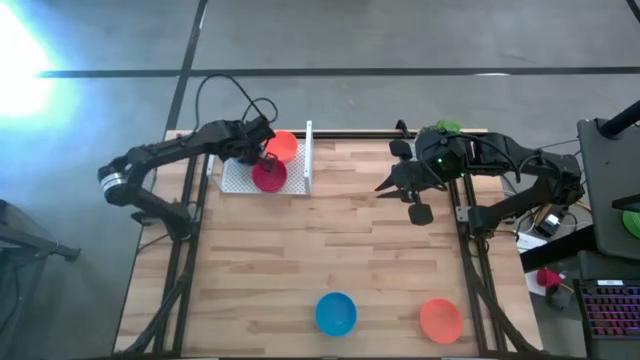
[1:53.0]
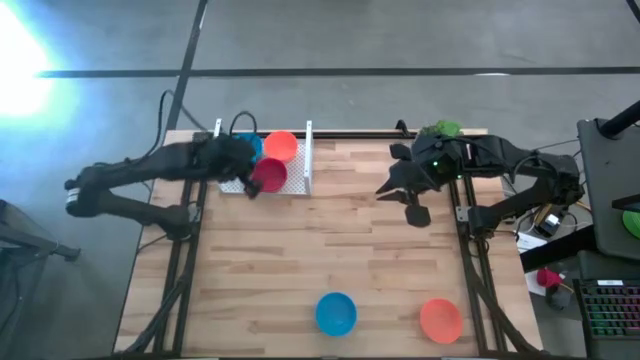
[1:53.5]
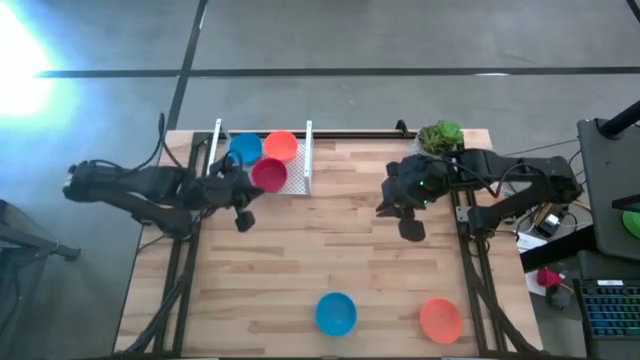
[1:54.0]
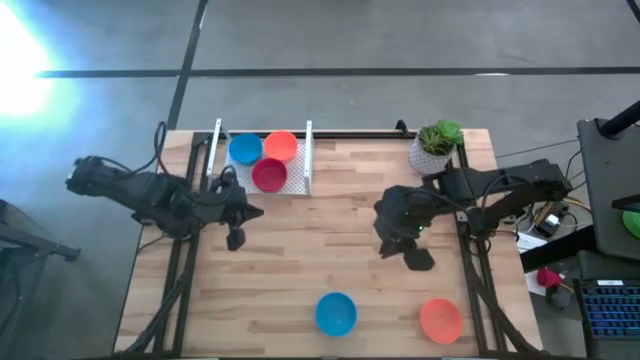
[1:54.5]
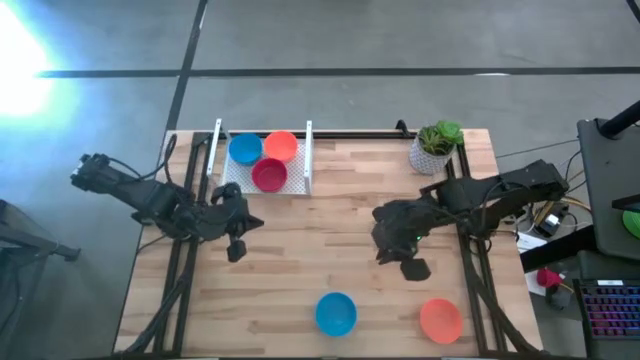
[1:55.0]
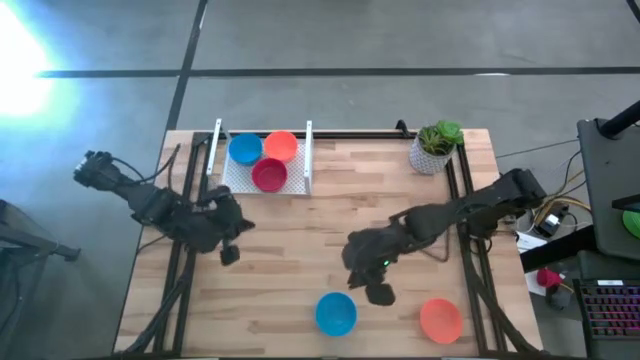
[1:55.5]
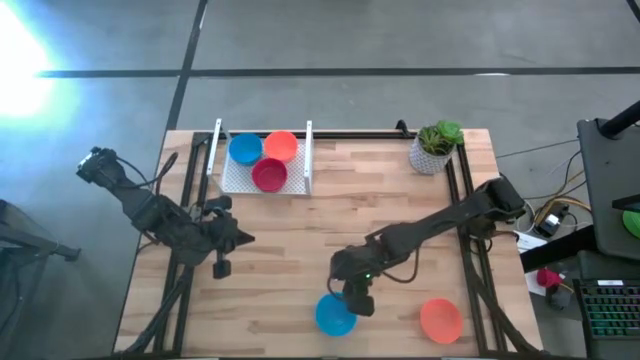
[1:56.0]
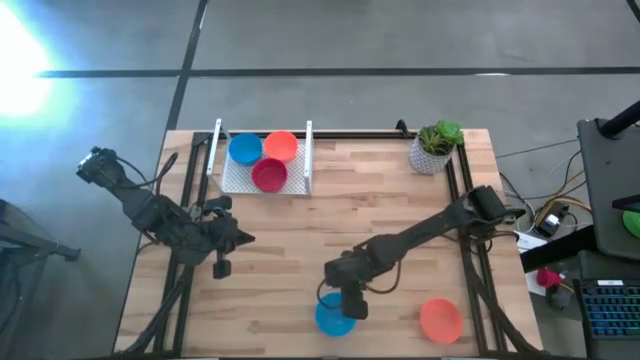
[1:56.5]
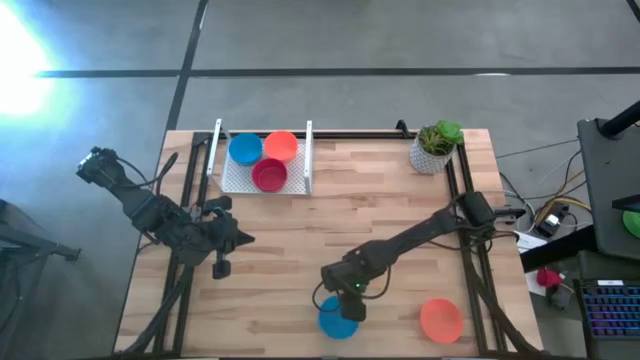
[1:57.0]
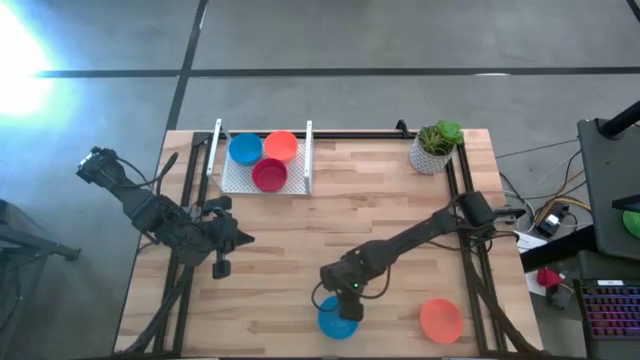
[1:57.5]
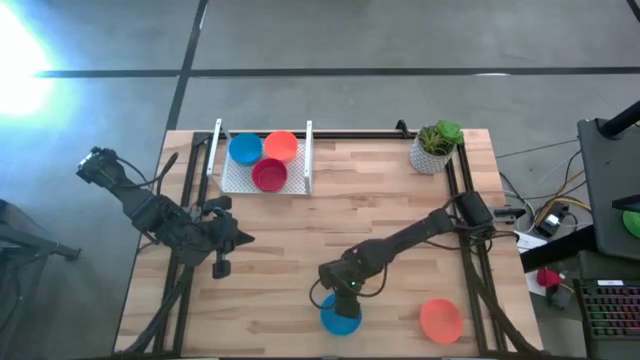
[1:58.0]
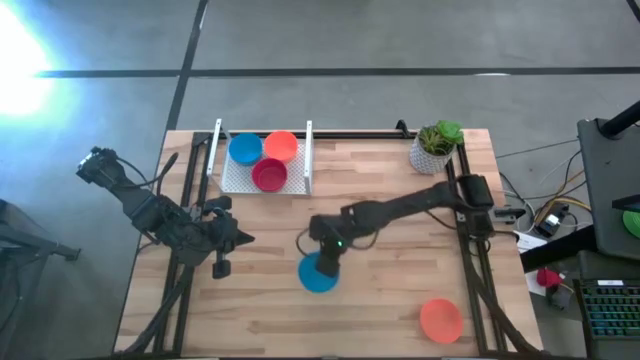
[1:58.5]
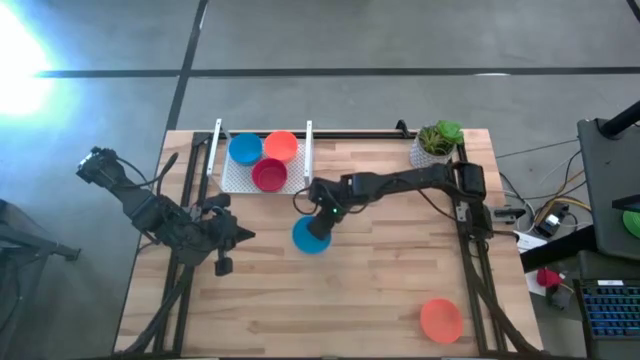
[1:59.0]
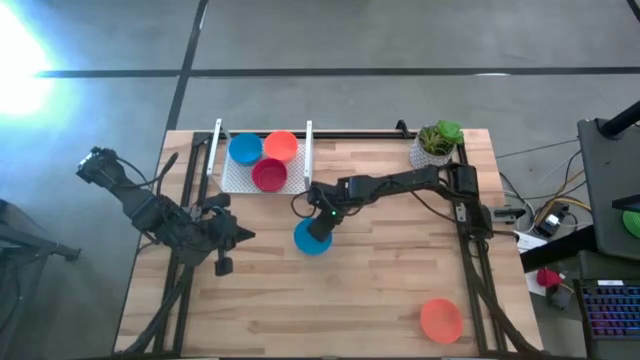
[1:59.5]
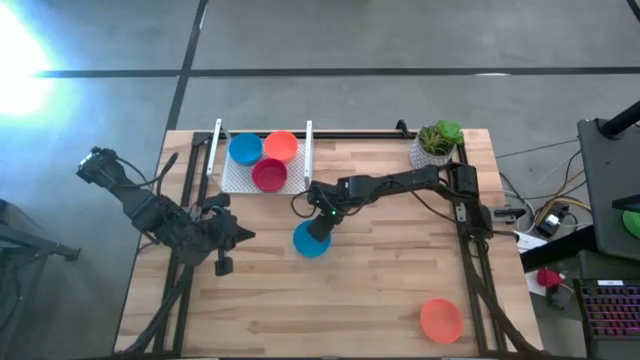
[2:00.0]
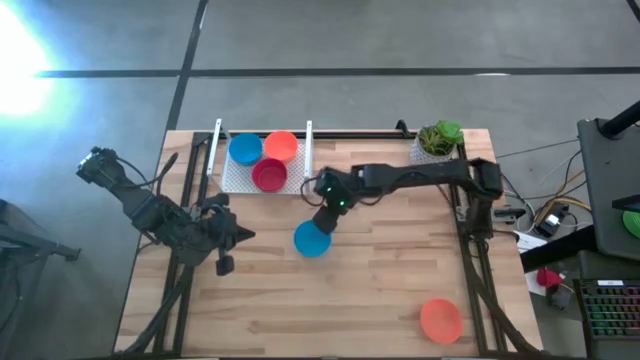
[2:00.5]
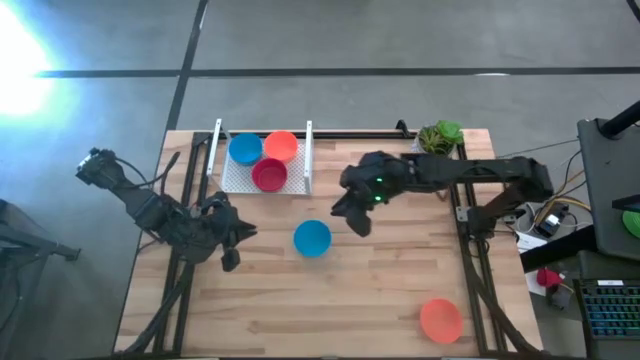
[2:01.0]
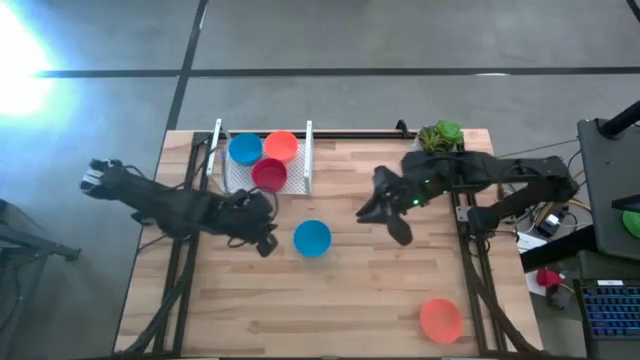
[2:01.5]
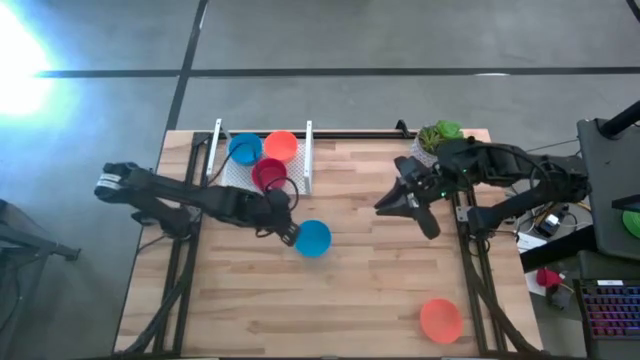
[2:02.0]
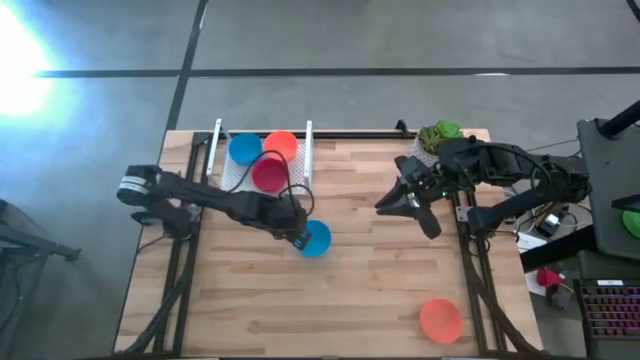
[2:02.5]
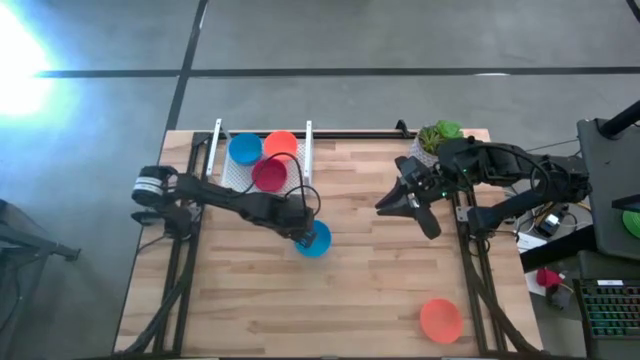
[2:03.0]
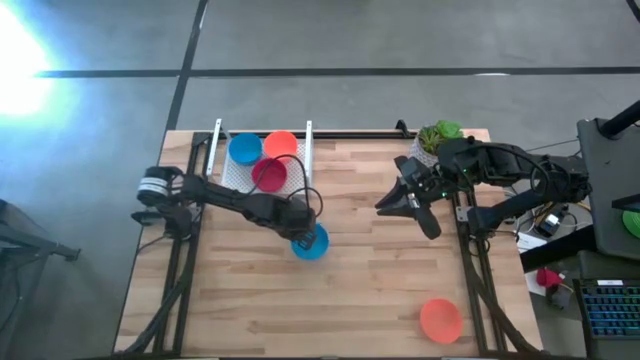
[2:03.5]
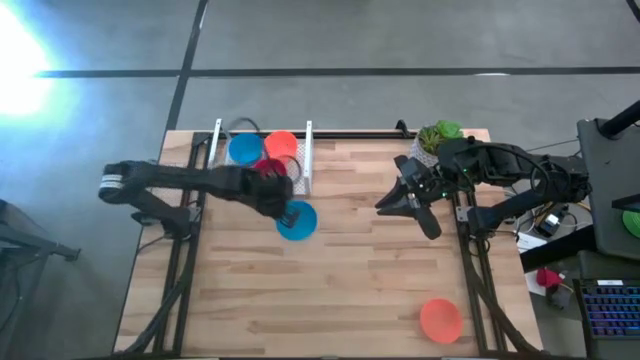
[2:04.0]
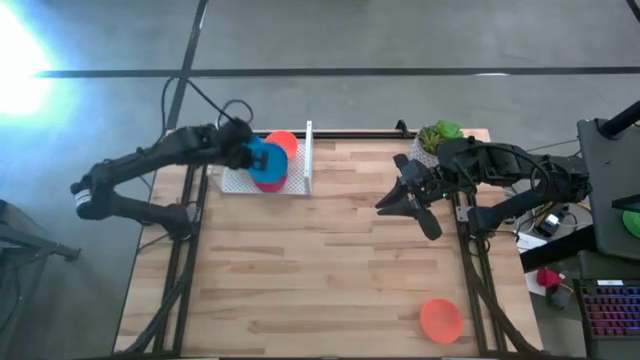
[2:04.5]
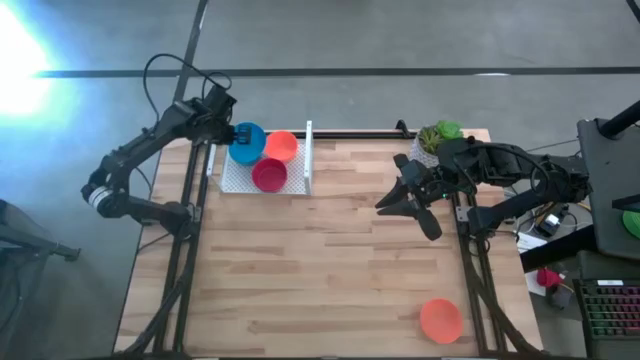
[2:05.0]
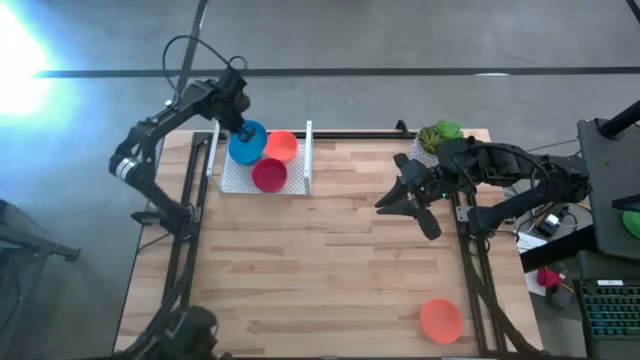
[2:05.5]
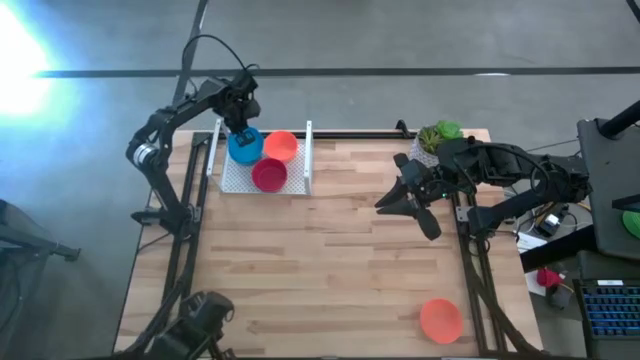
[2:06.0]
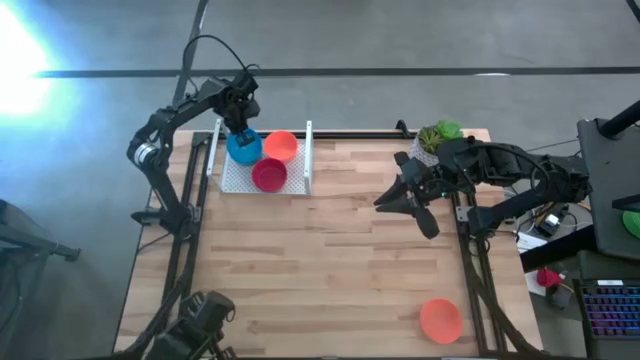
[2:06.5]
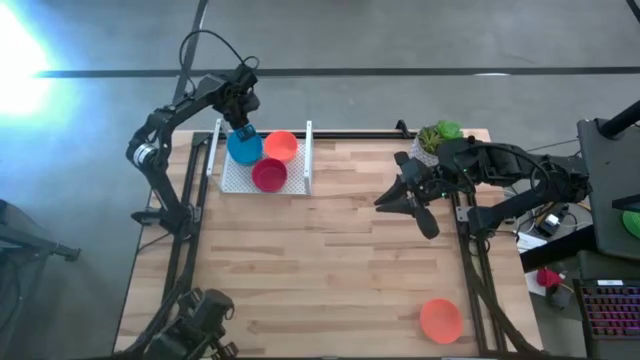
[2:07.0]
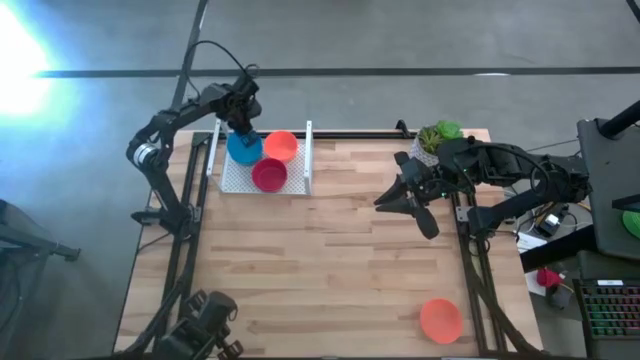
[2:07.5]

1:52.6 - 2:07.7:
Task: Pick & Place Mini bowls
Stack the blue bowl on the stacked blue bowls on the shelf

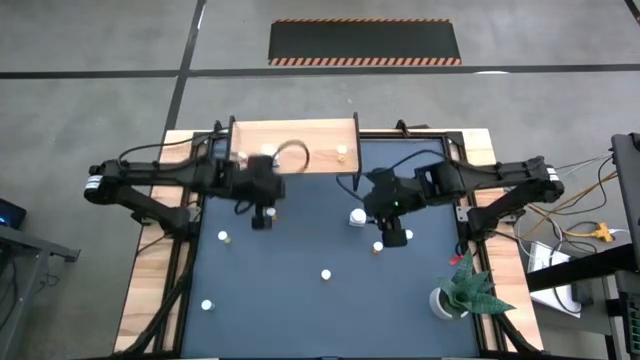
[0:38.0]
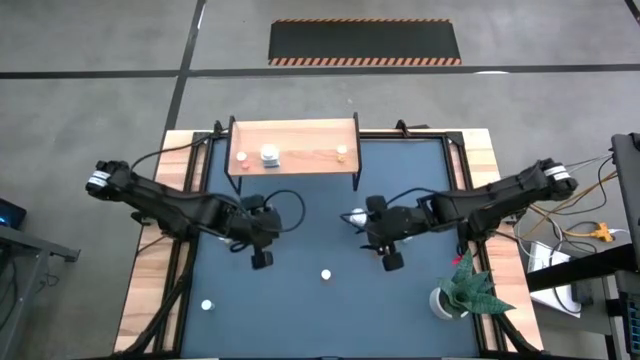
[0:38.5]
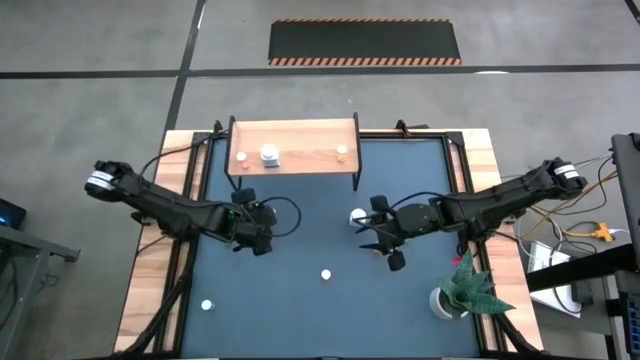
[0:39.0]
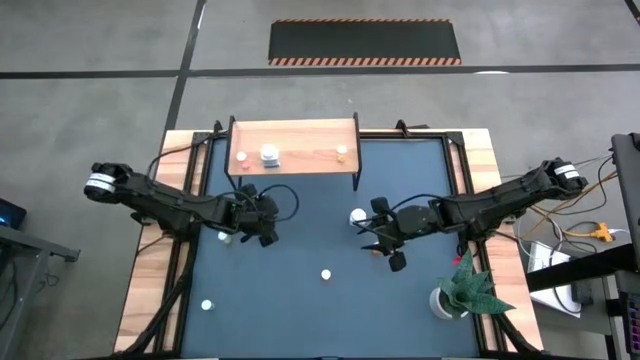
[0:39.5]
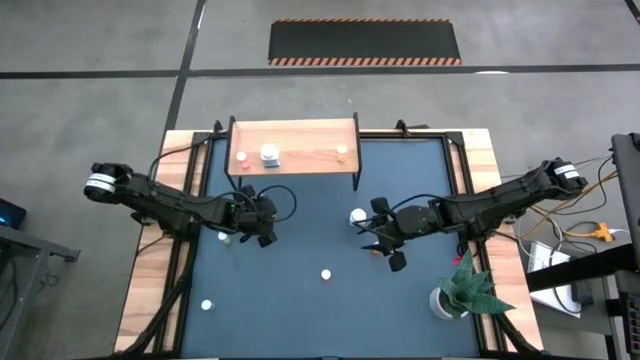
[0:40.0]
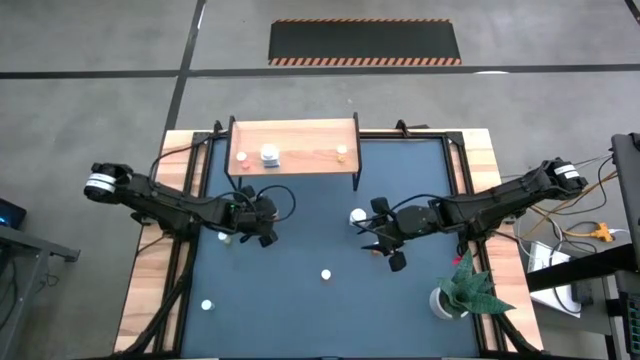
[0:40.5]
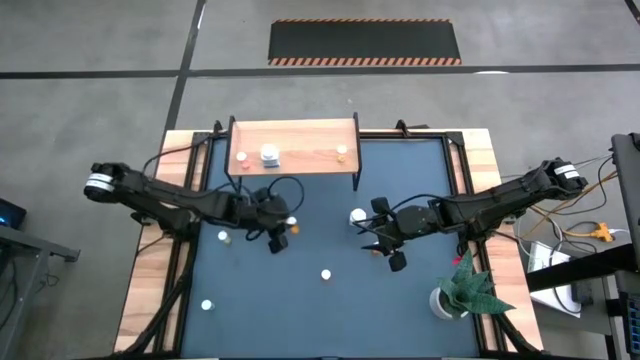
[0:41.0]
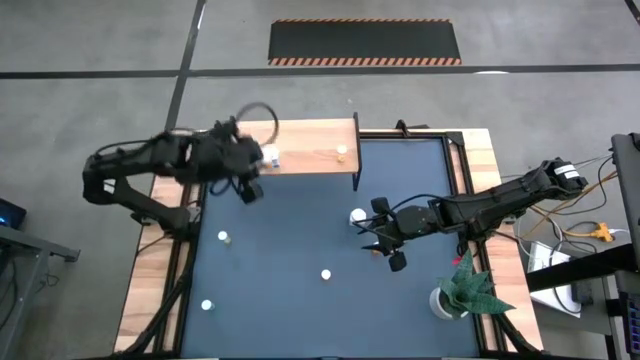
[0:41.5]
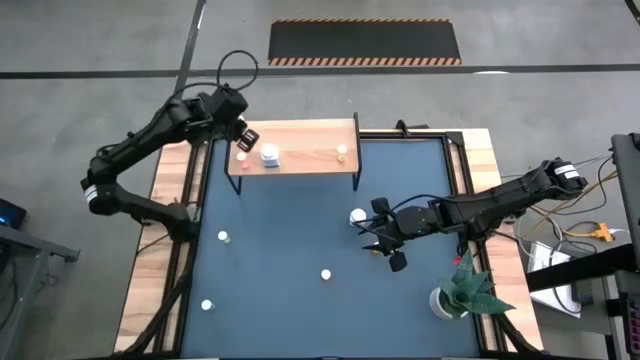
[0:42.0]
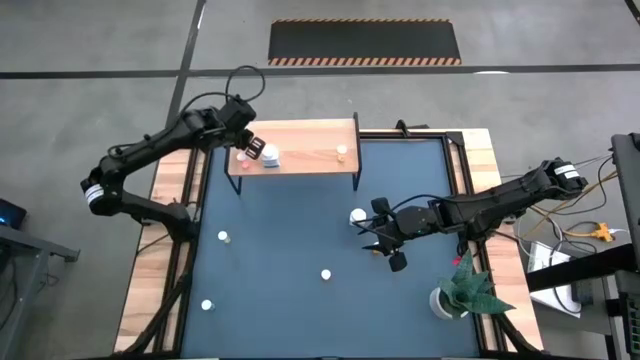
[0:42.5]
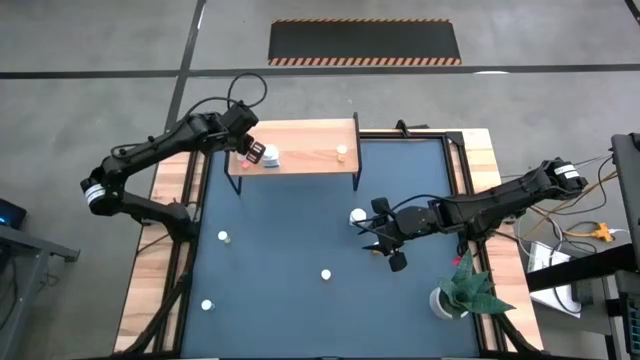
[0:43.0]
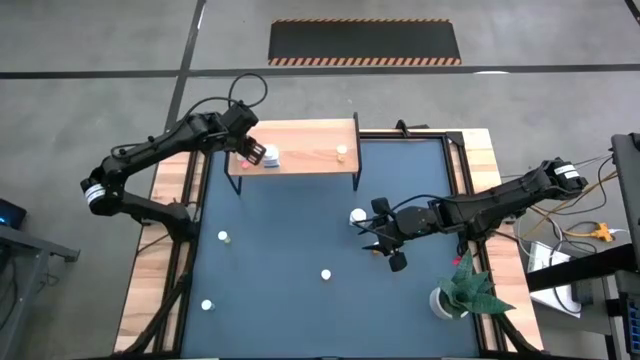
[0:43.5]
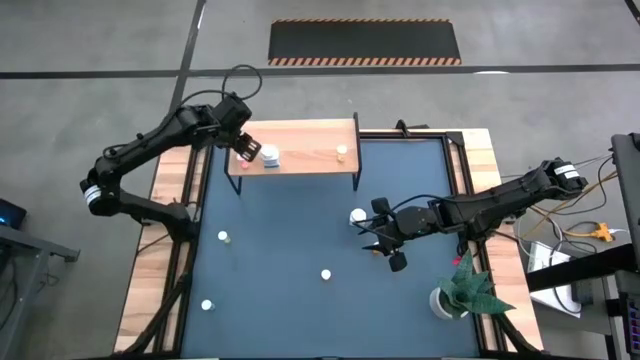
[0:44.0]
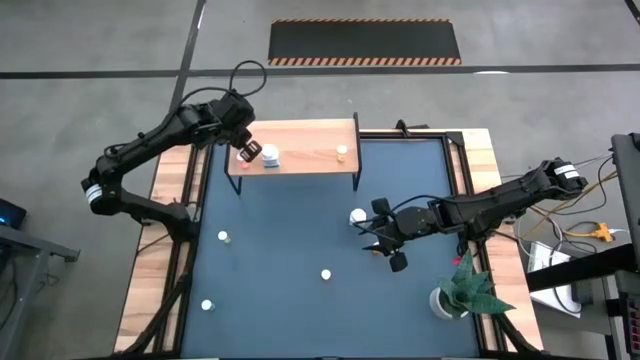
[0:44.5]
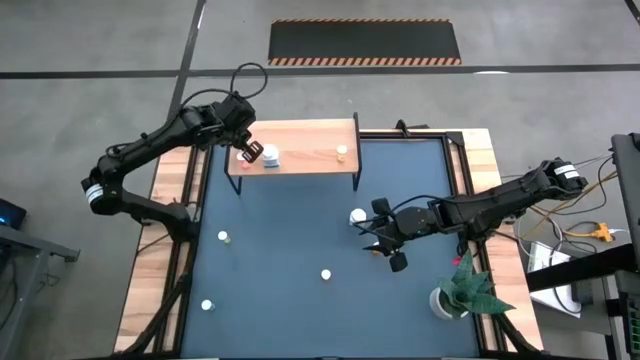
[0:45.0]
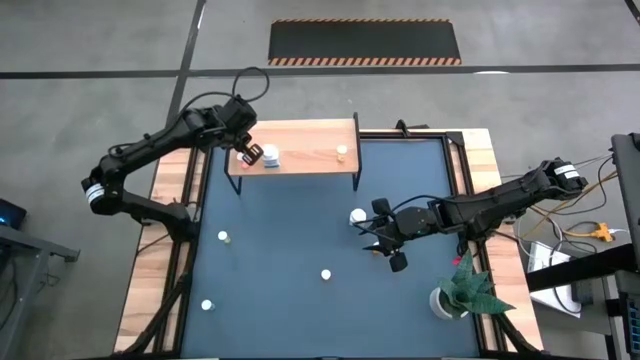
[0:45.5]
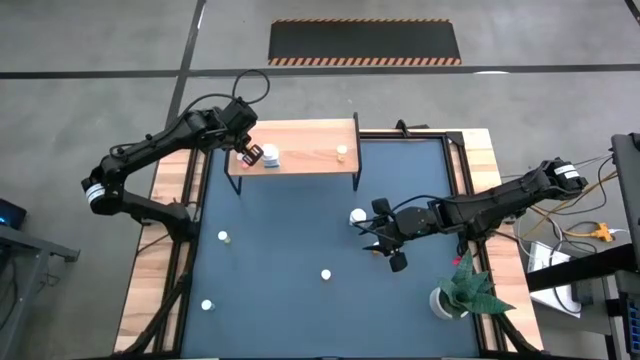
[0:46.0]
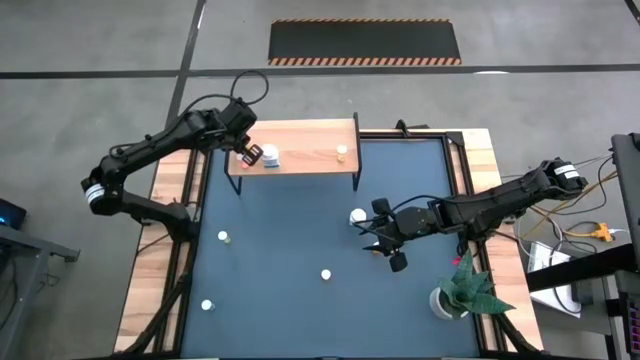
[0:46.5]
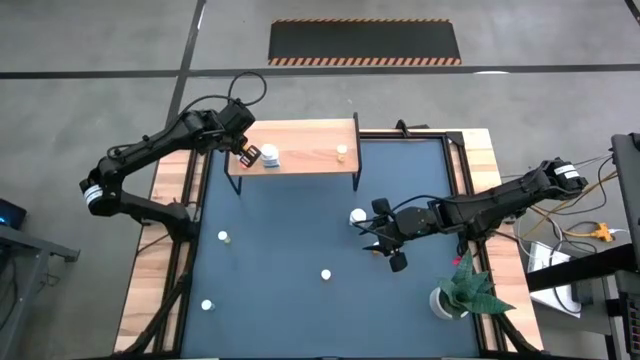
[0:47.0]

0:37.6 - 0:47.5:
Task: Pick and place medicine bottles onto shelf by color
Put the left orange pill bottle on the shelf
